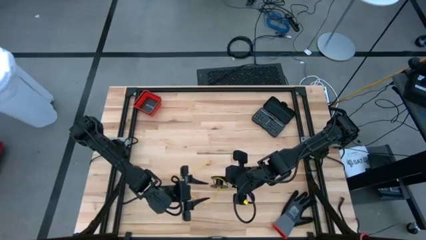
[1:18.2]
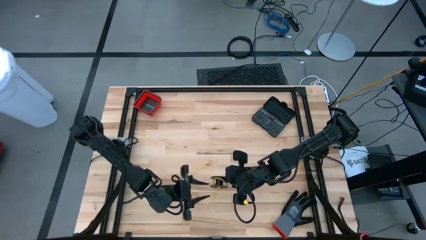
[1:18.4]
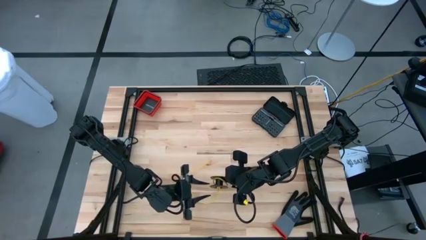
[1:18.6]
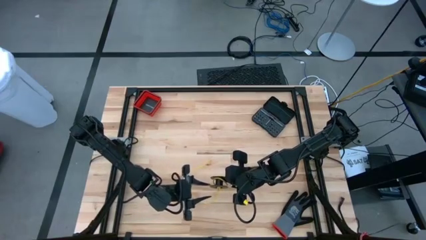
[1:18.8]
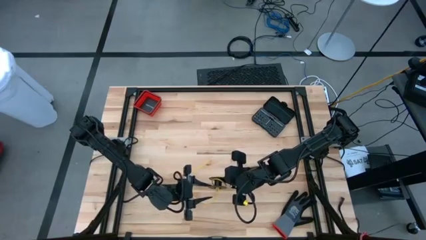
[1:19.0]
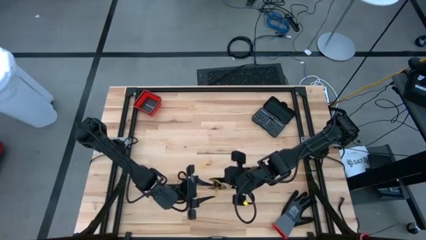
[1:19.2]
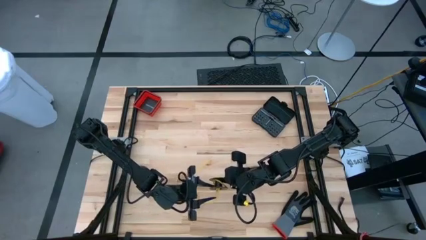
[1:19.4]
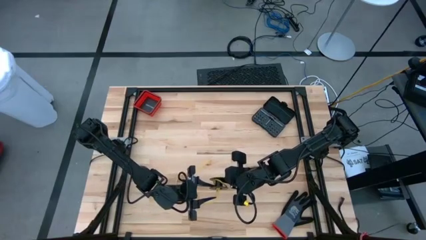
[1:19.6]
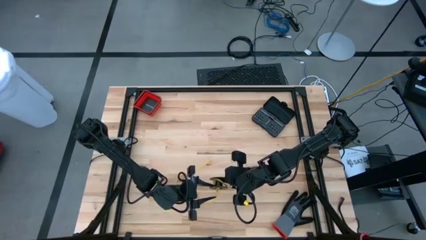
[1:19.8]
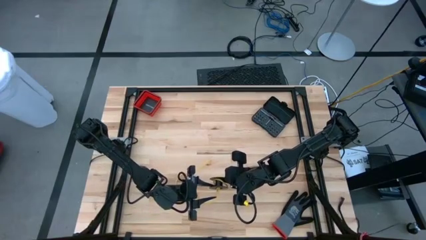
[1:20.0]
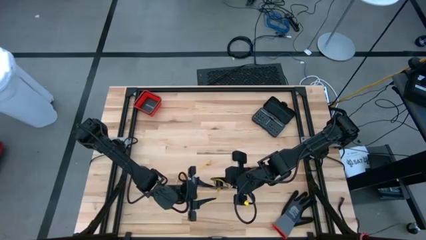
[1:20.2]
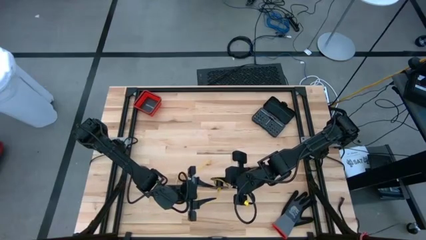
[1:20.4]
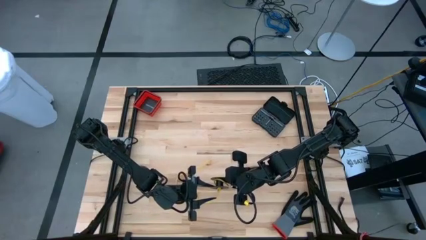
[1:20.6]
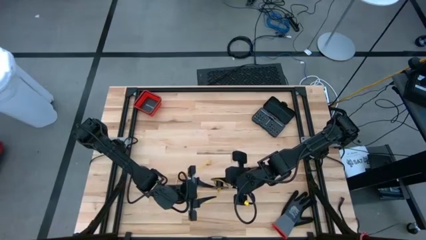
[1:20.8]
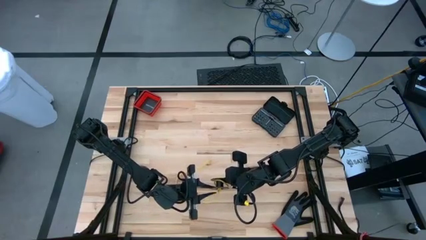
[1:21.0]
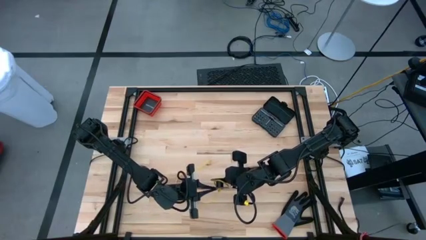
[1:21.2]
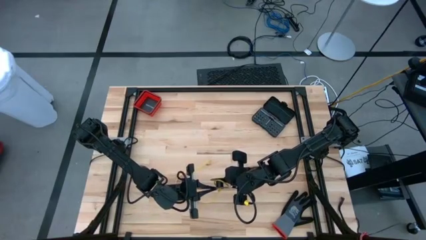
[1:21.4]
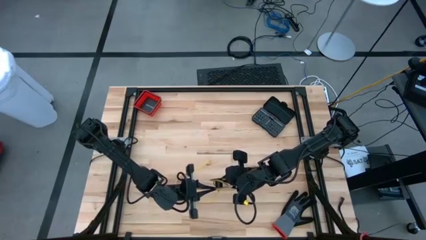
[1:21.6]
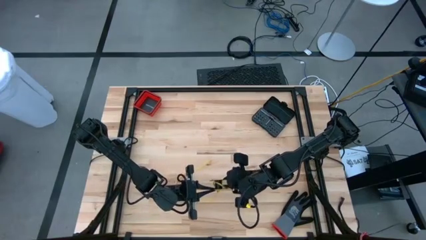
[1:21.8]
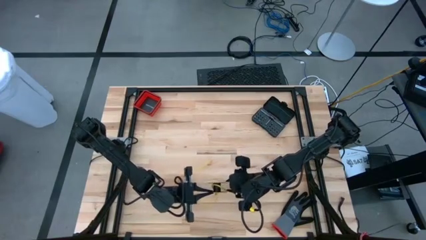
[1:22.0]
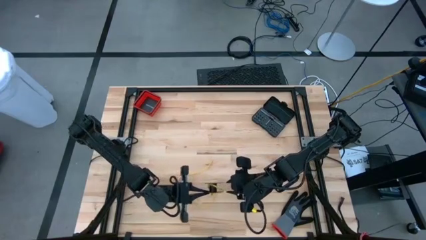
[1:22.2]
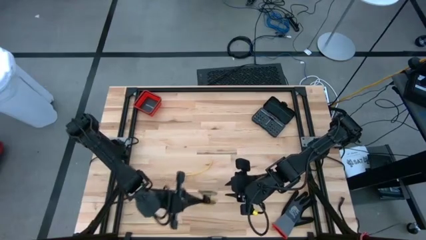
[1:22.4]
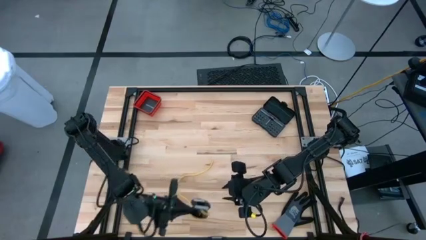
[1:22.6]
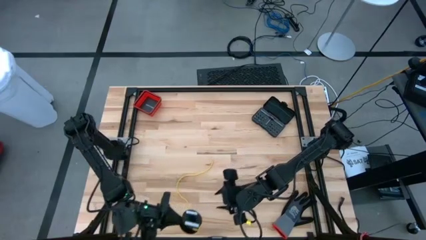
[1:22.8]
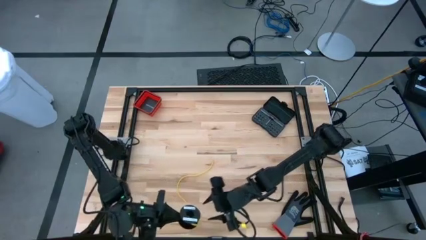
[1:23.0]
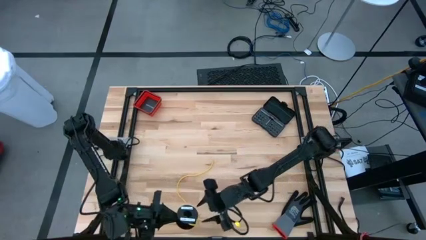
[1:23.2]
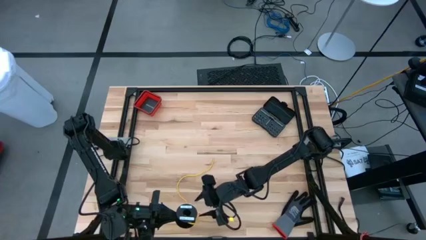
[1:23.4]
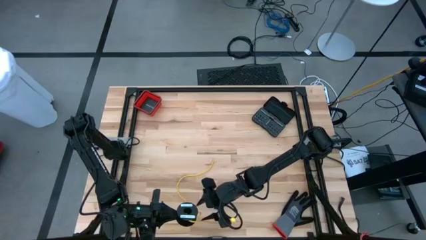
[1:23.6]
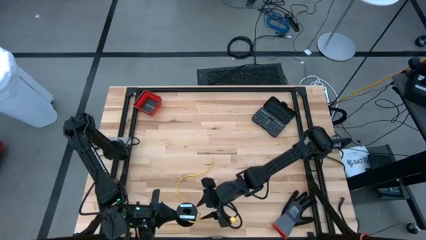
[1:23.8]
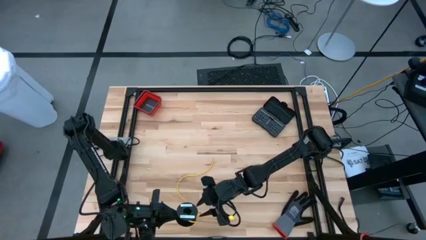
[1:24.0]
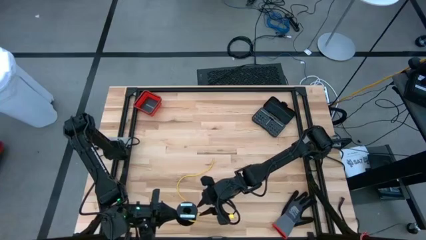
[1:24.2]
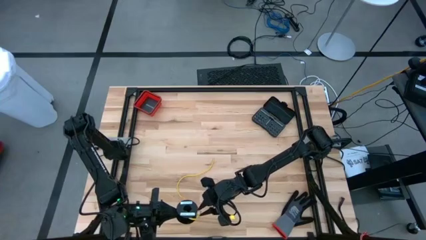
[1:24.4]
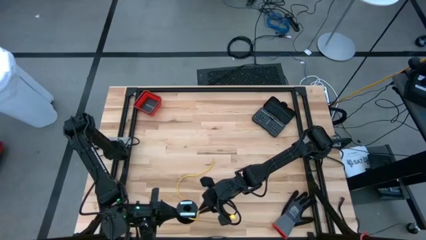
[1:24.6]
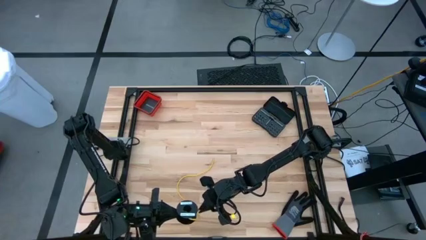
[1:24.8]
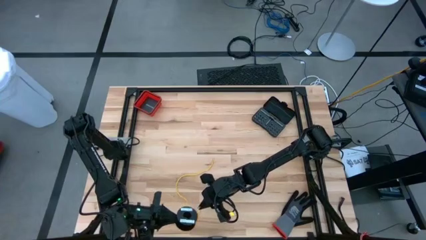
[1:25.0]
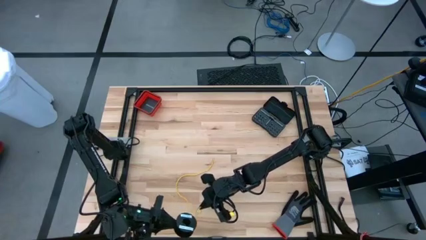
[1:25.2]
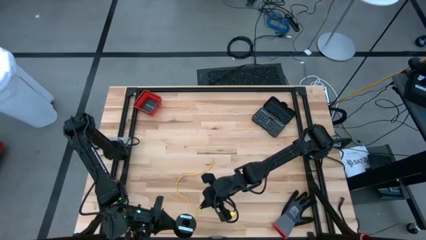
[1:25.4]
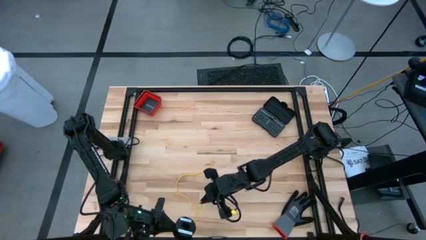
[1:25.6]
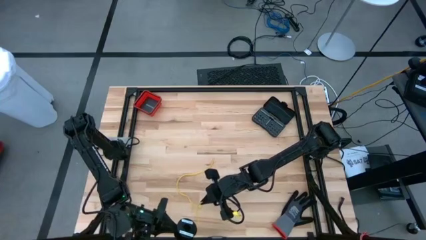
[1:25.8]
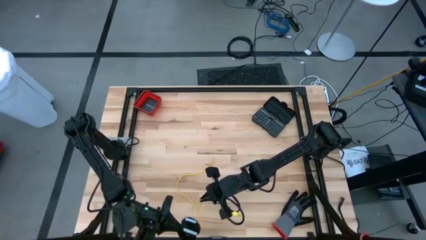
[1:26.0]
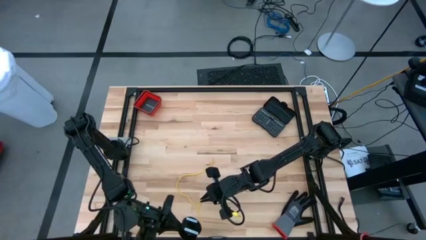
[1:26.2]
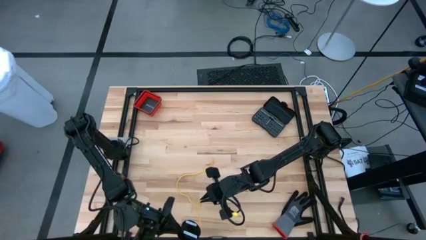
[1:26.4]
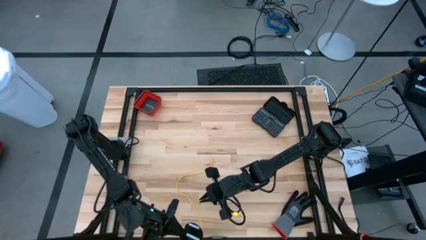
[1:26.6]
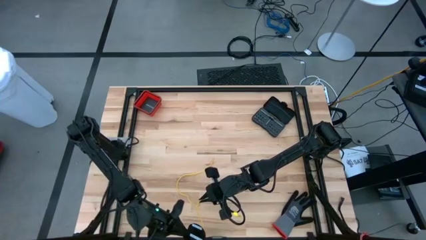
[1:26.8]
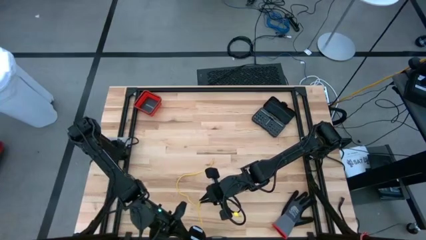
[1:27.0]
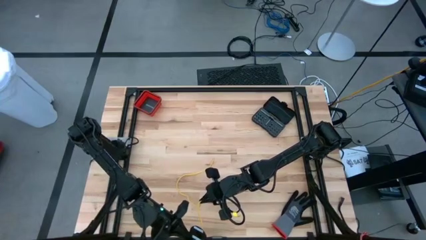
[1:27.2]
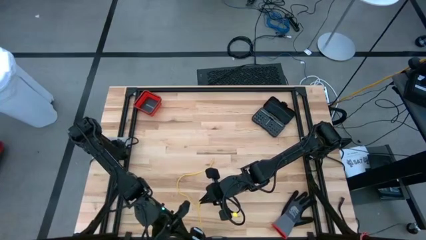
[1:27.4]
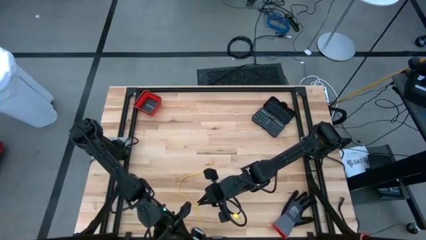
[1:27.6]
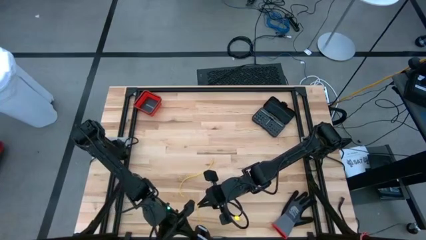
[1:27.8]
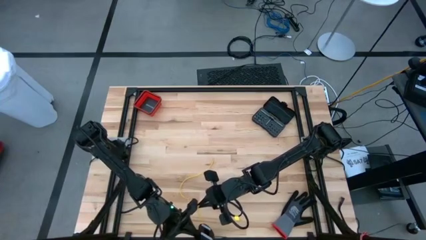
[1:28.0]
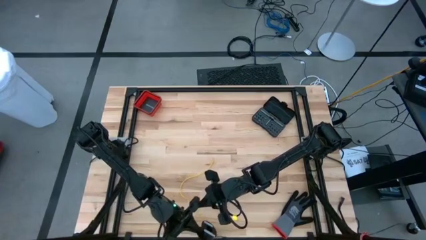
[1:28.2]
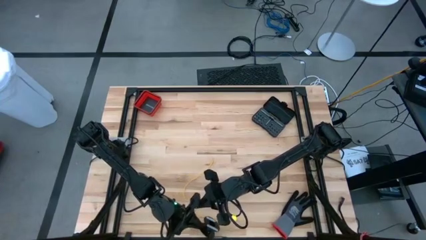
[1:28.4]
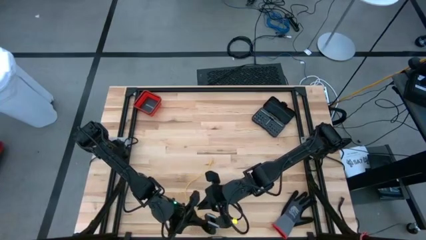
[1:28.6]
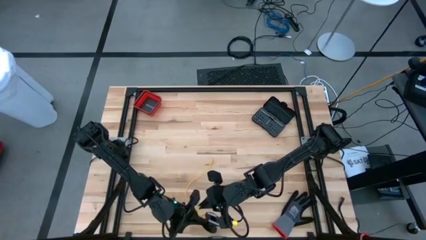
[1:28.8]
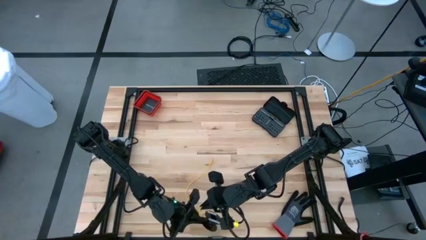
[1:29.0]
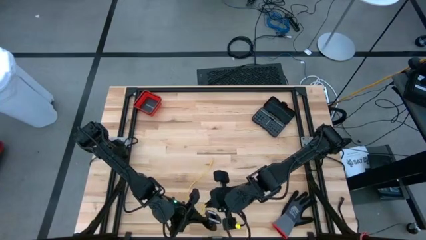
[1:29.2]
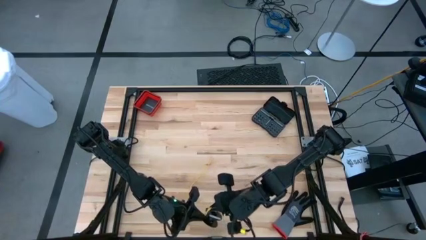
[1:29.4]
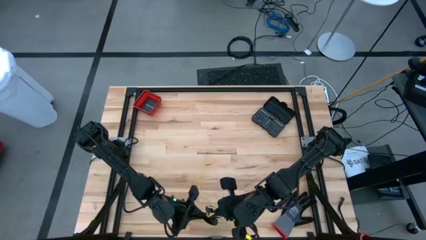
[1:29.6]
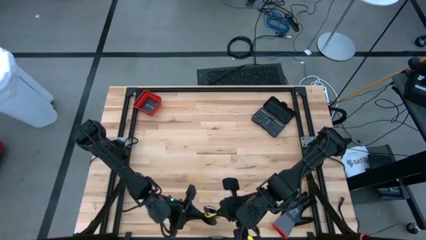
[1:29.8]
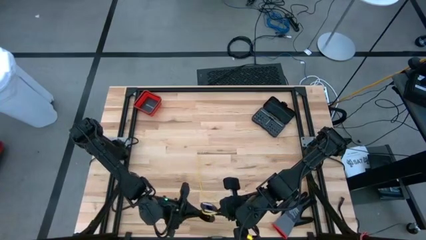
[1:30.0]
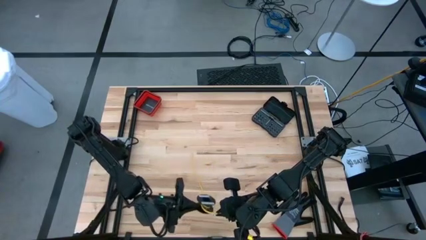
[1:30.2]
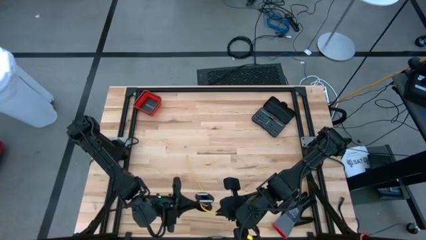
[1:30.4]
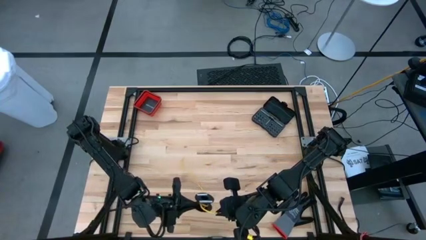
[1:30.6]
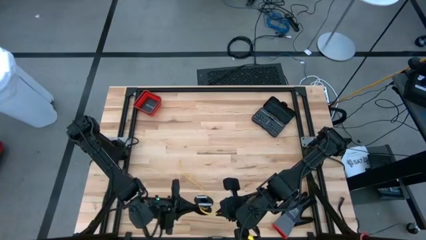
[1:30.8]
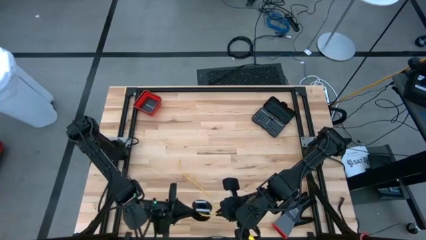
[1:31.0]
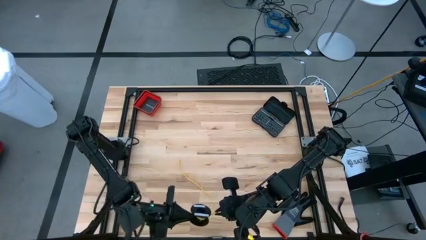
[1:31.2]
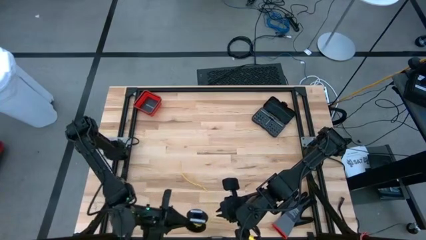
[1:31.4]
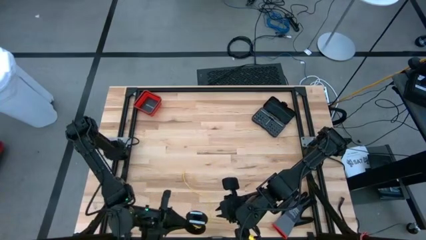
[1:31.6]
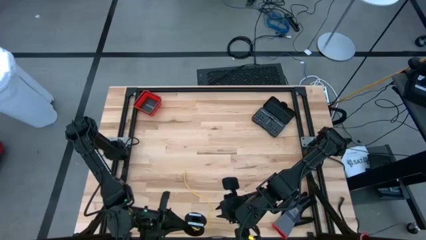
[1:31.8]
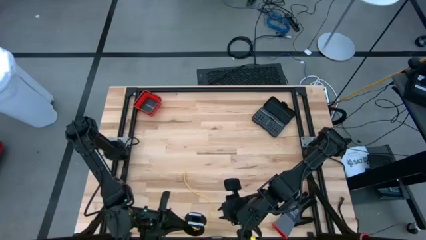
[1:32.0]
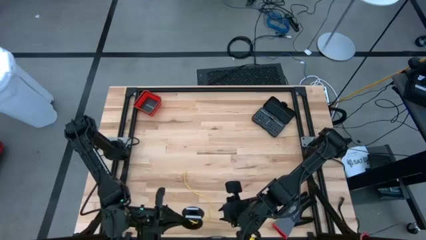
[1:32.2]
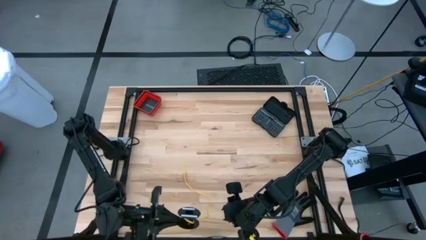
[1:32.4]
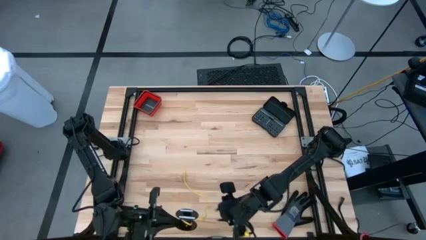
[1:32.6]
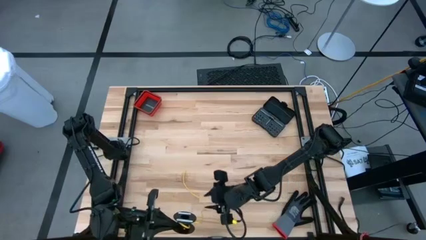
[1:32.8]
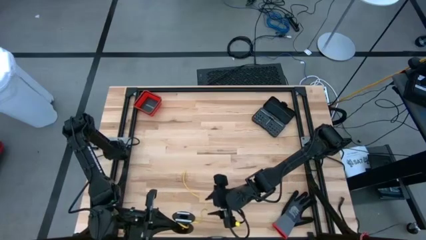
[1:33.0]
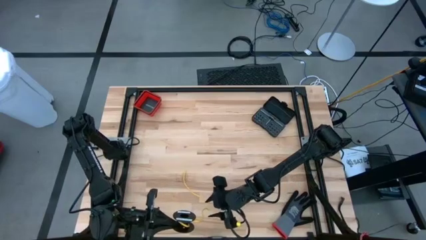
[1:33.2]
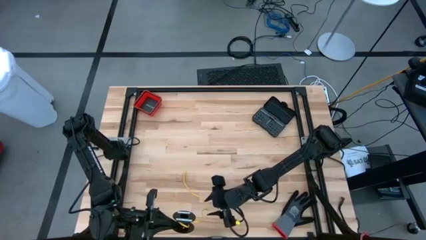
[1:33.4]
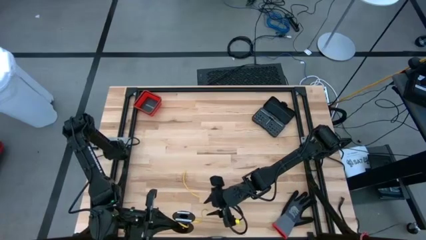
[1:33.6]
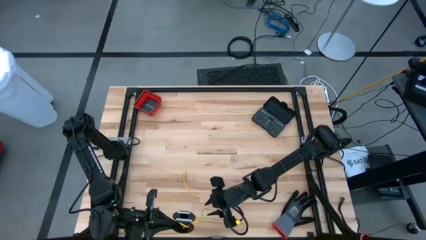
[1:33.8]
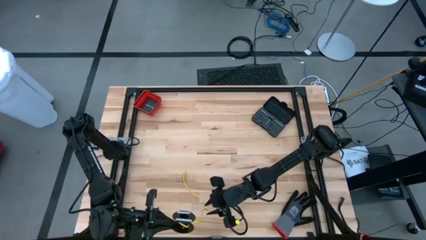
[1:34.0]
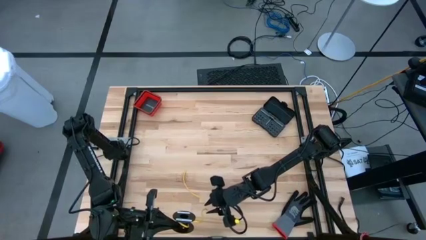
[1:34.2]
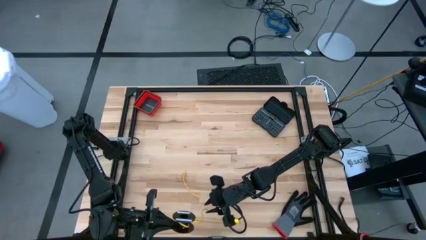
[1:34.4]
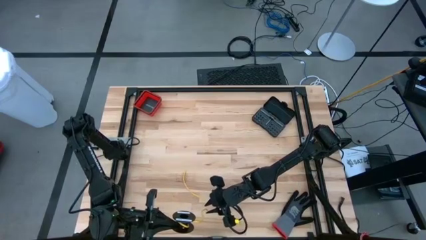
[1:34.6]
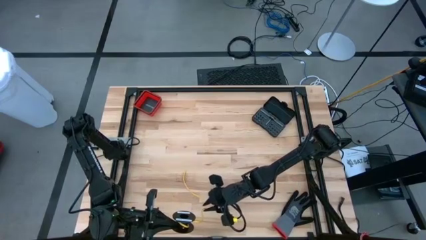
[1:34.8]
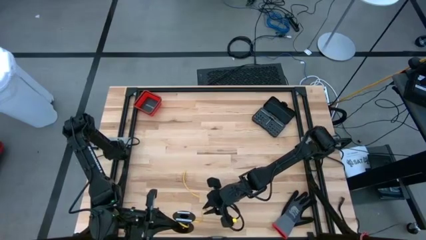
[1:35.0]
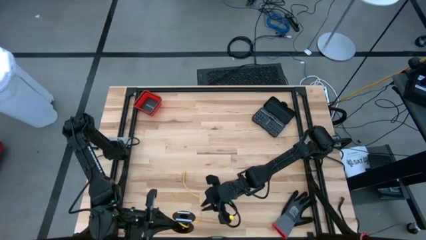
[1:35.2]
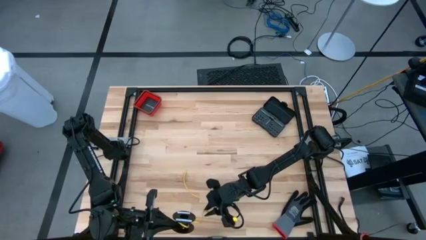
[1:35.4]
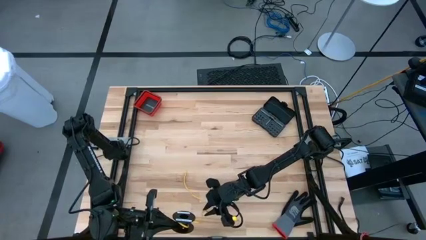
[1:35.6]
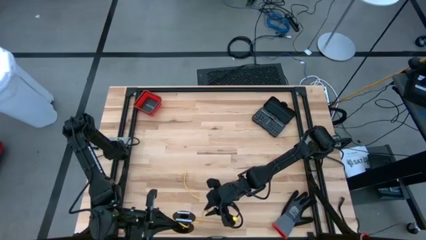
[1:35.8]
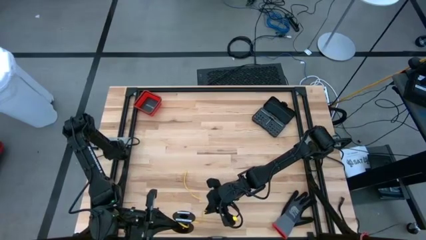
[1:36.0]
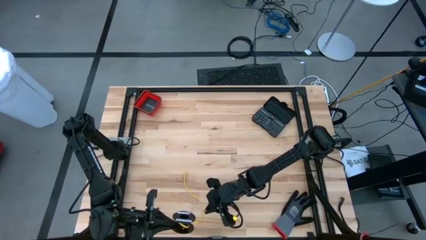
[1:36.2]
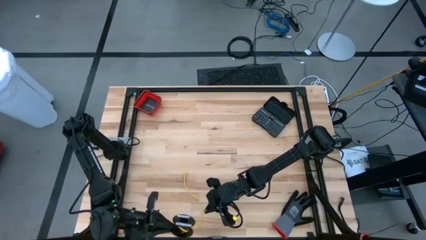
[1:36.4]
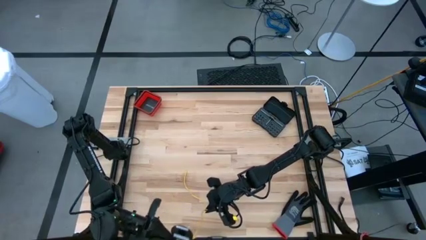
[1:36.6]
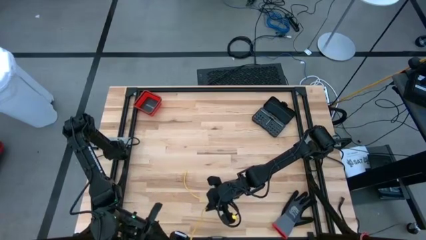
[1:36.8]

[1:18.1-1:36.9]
Task: Coil cords
Coil the yellow cable wire onto the spool
